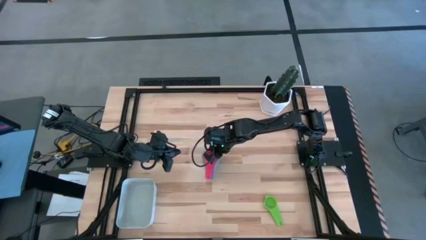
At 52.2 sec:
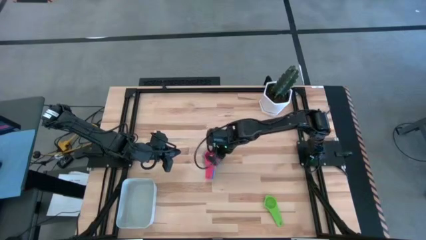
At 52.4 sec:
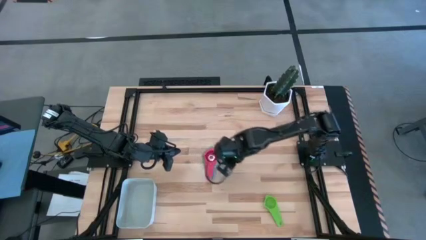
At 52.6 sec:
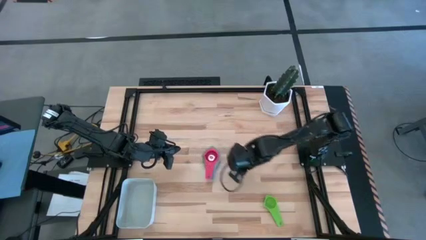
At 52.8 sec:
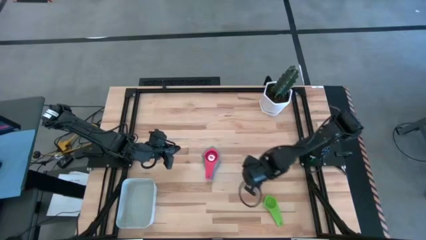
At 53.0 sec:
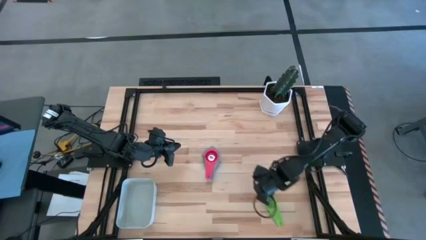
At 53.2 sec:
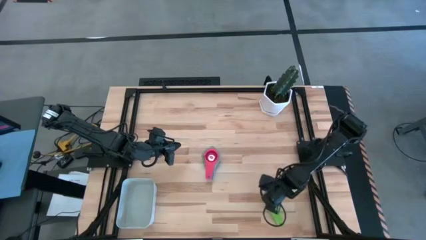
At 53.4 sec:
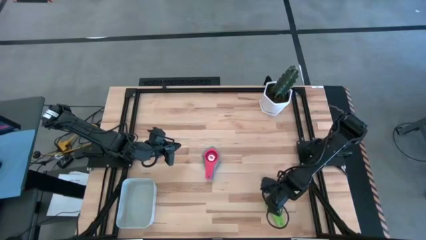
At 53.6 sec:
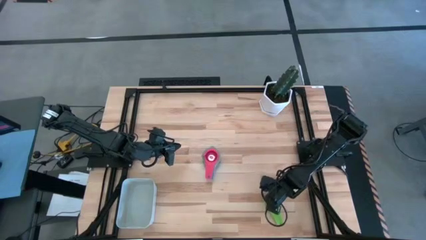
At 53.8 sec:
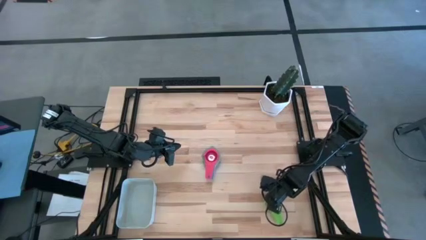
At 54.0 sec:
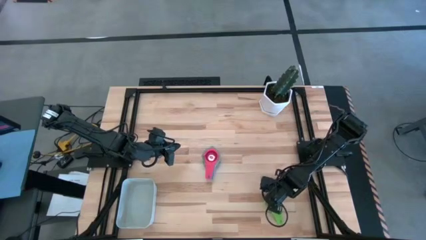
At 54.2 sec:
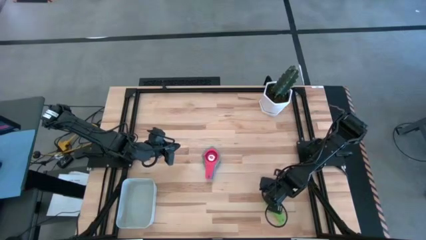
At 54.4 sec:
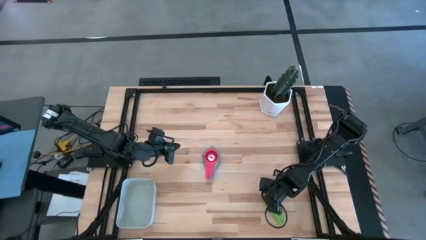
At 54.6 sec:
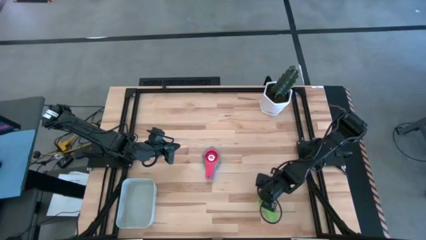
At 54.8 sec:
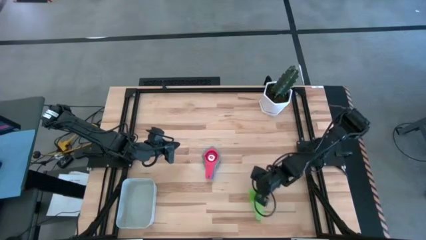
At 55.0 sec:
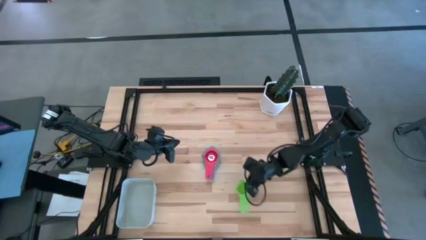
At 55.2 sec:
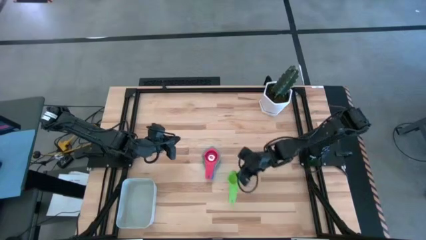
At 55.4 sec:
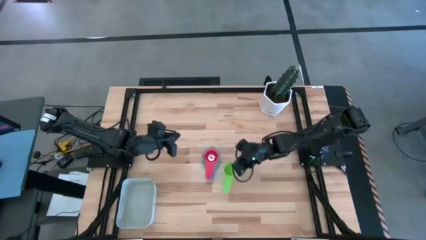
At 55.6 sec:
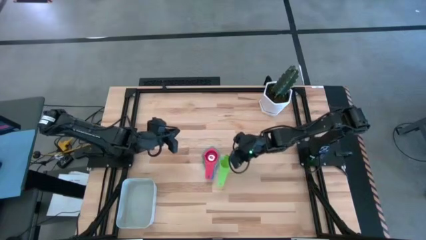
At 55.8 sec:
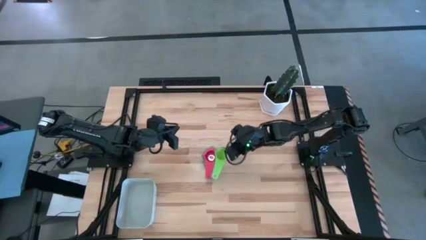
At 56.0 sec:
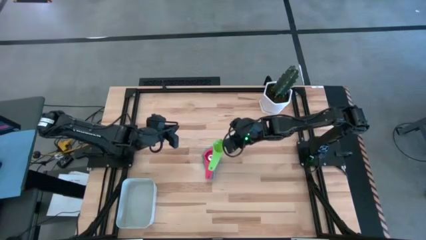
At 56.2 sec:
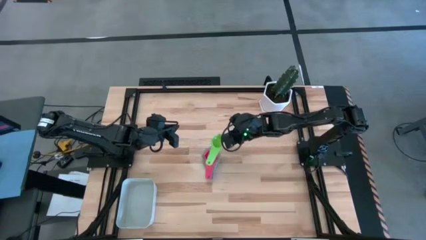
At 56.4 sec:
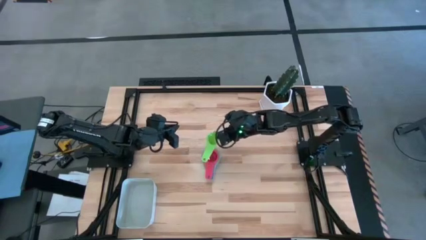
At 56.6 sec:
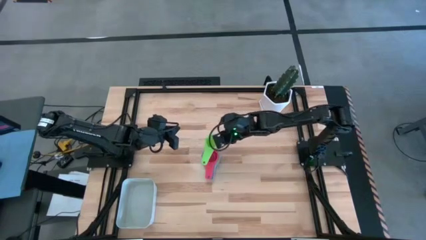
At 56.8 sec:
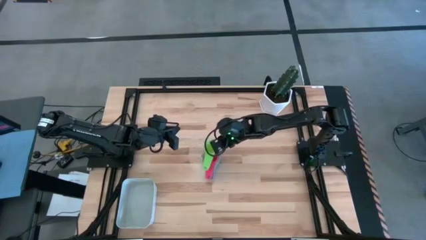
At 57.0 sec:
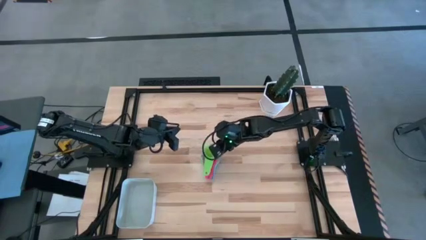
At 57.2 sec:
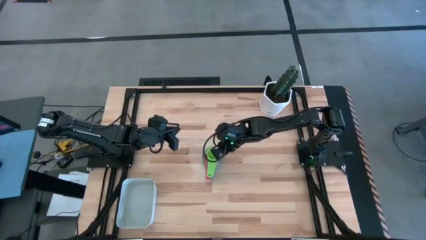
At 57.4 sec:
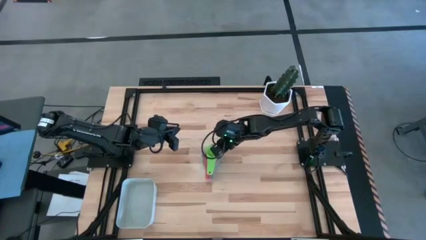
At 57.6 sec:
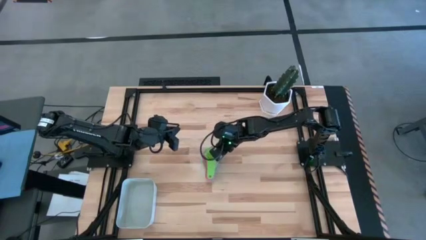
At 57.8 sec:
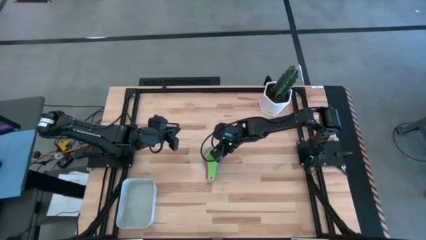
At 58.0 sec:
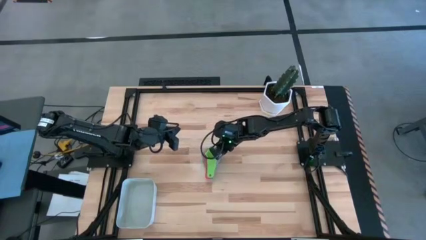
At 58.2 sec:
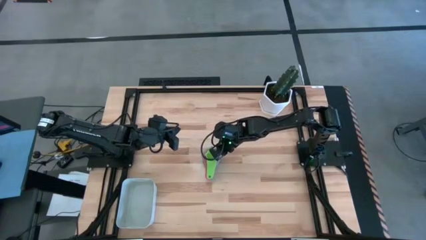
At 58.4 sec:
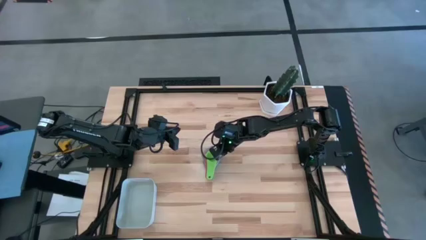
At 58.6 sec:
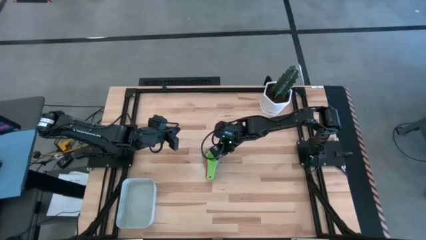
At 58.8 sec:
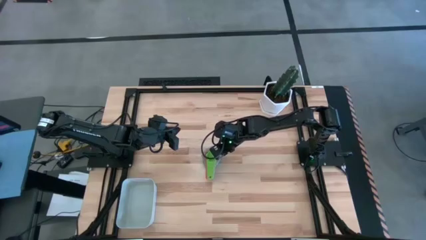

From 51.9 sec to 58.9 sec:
Task: Nest measuring cups in basket
Stack the green measuring cup on top of the pink measuring cup

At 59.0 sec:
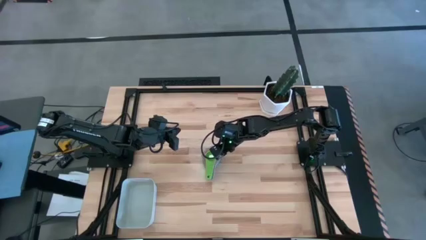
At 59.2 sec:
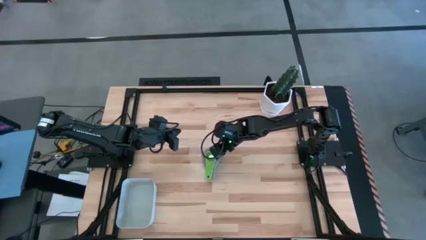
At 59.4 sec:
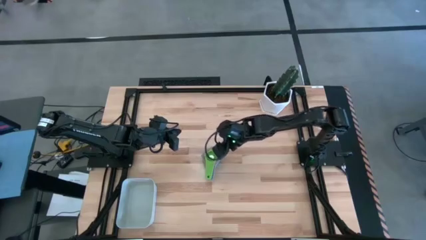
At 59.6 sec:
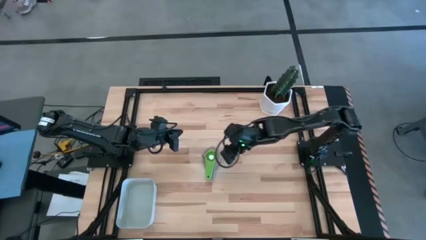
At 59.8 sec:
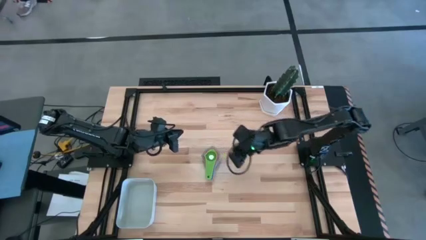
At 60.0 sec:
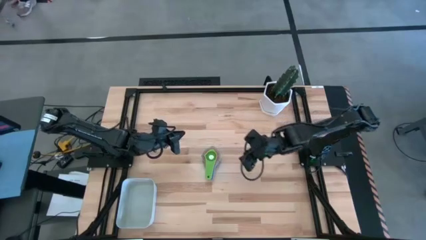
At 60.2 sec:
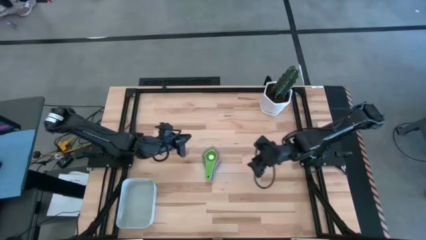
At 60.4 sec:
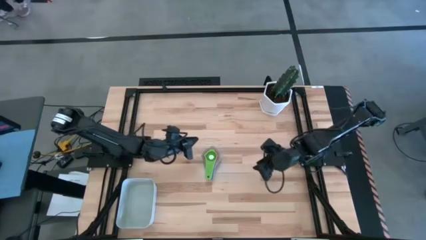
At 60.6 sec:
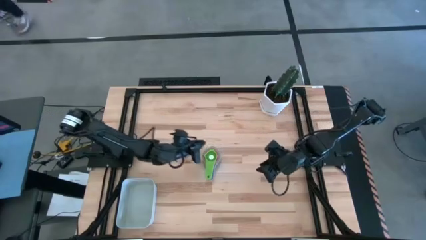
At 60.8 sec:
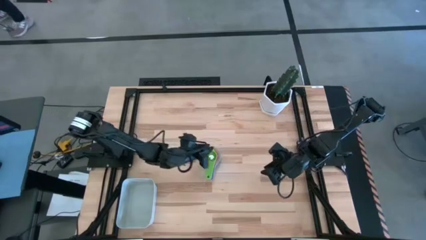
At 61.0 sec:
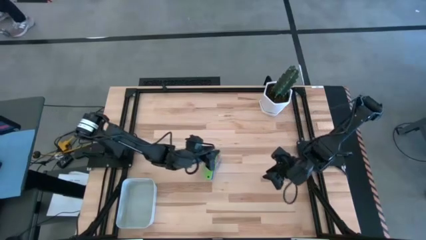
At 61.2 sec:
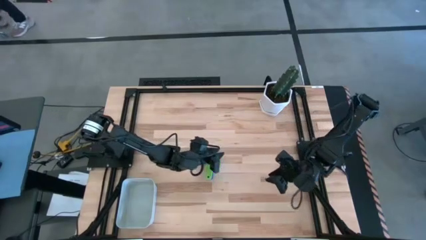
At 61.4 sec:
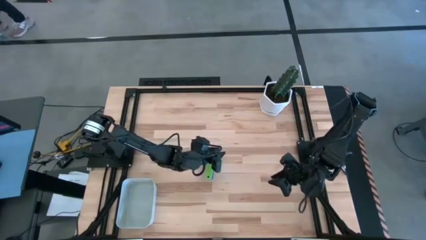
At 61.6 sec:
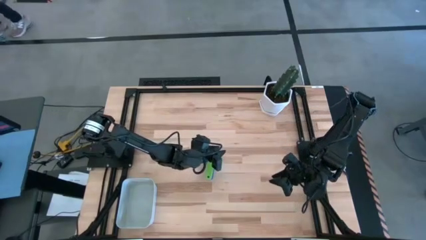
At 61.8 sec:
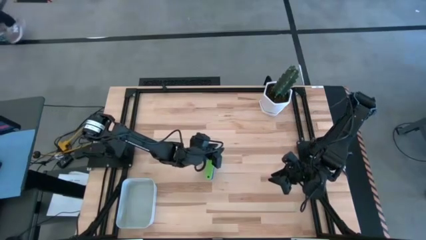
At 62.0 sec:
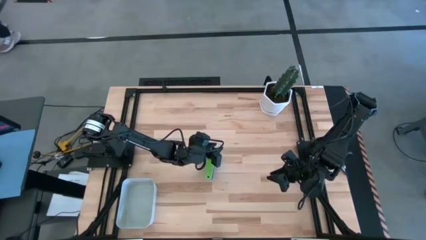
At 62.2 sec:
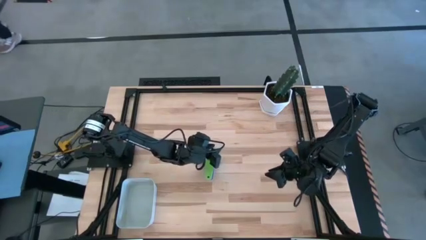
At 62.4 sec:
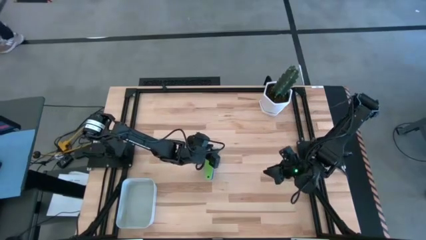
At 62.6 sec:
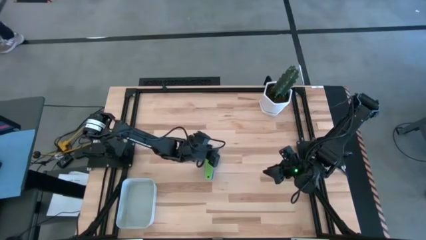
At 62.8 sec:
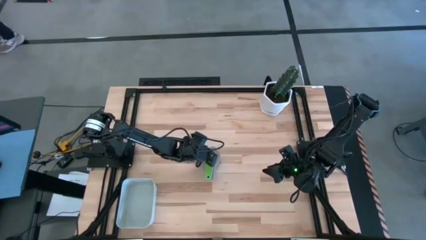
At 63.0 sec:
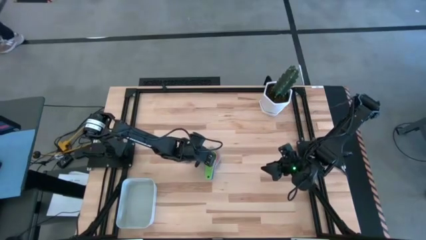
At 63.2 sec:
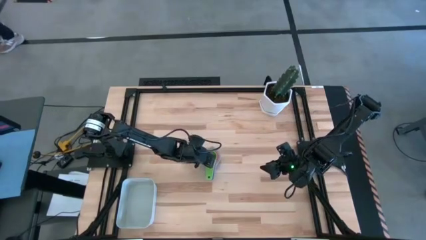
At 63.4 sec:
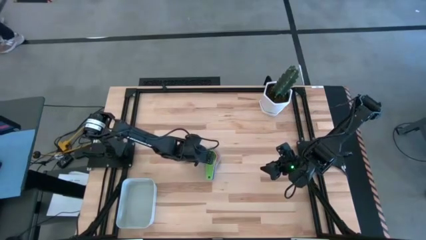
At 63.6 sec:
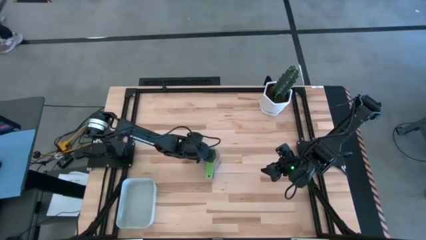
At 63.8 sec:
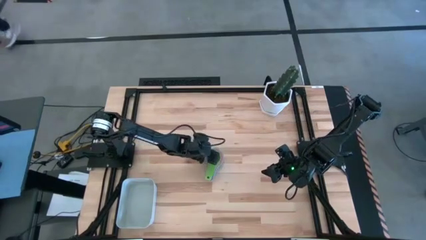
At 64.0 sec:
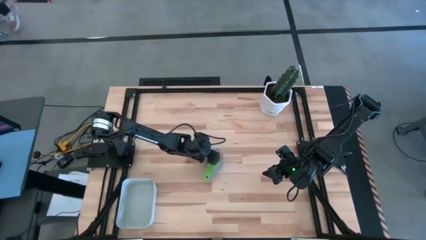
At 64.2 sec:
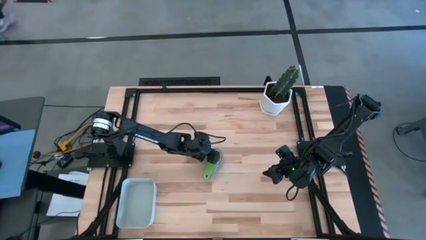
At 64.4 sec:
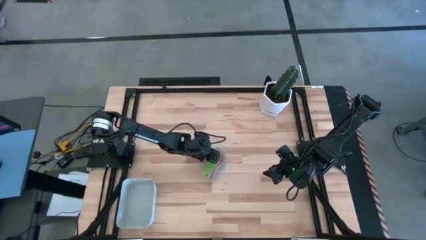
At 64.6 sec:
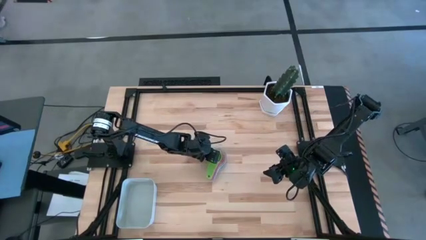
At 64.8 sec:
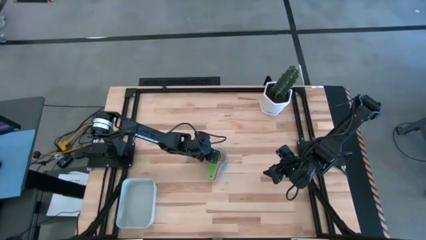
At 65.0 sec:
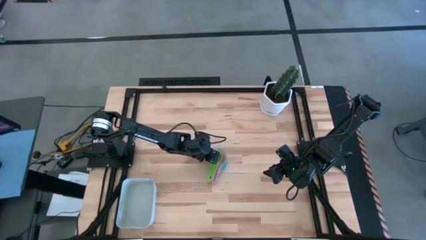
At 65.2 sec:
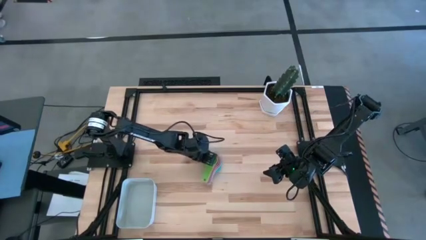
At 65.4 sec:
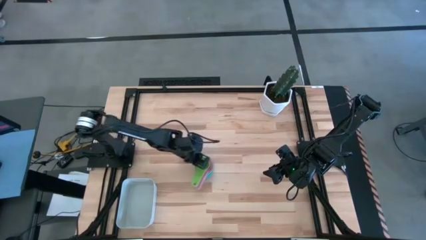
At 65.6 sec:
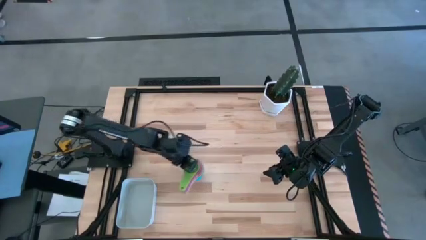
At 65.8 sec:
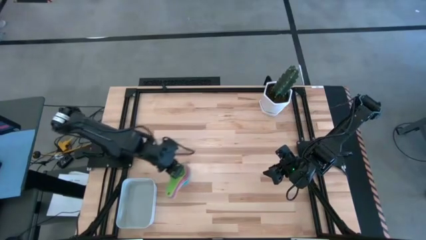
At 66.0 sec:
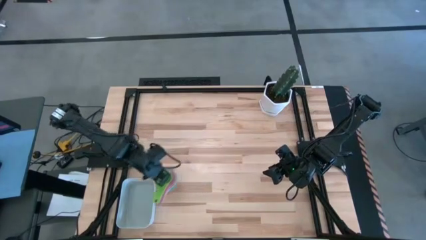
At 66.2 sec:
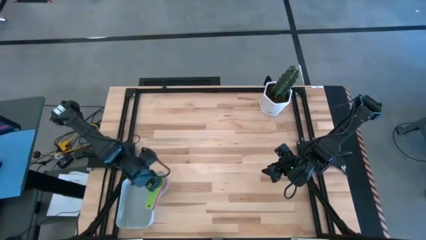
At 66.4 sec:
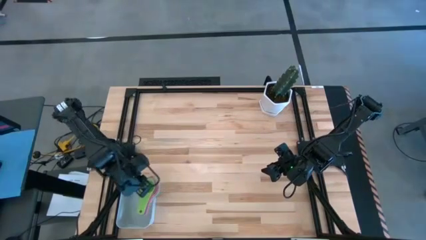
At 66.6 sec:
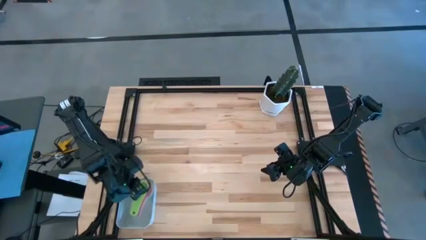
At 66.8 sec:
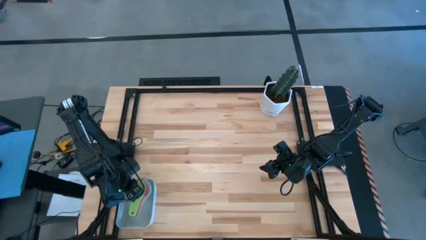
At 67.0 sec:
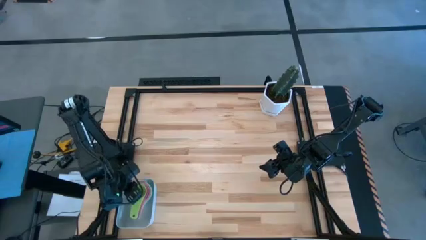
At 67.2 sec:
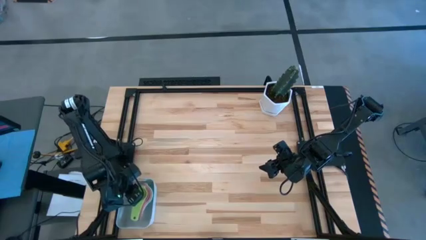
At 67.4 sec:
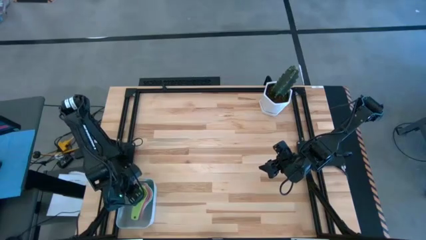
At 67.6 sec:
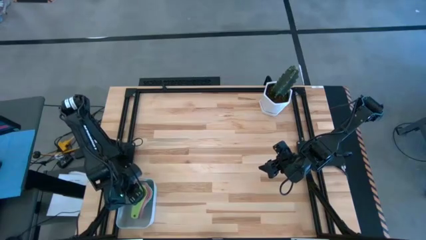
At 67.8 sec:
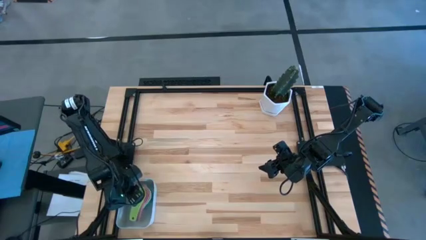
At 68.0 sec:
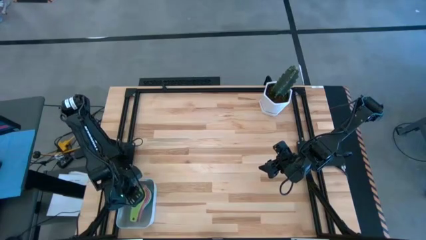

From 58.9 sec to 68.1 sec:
Put the nested measuring cups into the white bin
